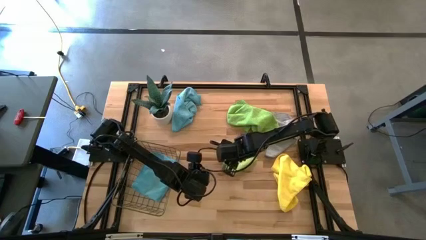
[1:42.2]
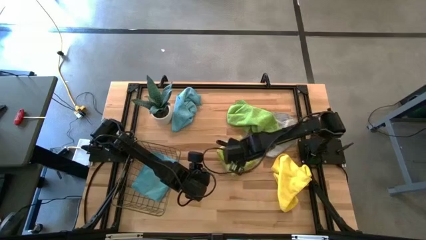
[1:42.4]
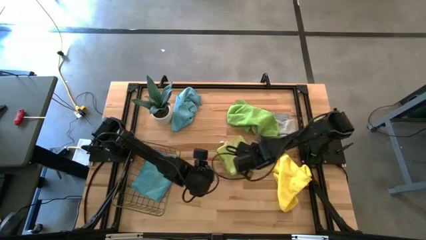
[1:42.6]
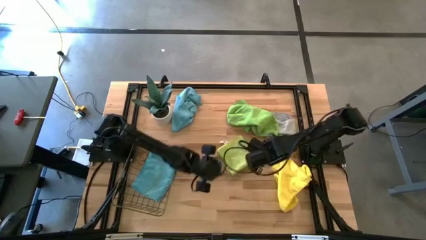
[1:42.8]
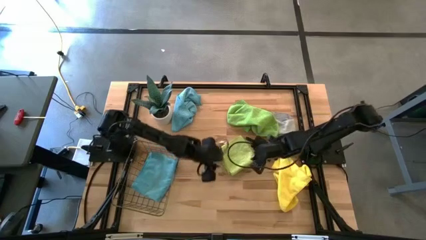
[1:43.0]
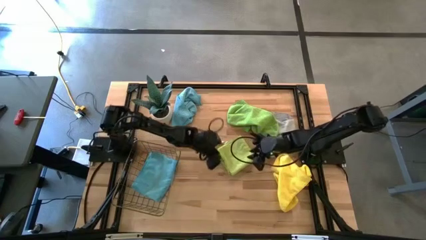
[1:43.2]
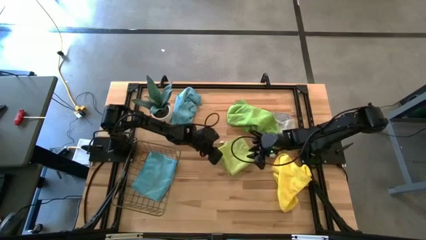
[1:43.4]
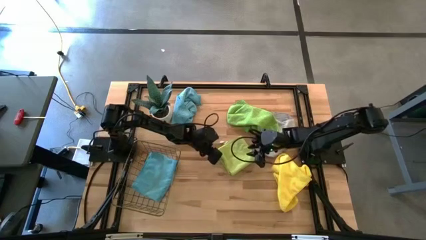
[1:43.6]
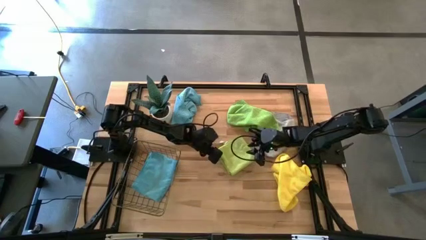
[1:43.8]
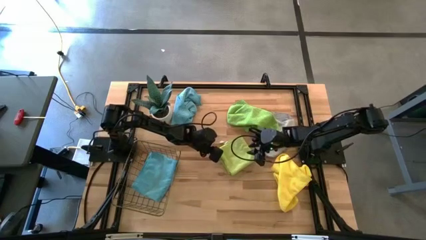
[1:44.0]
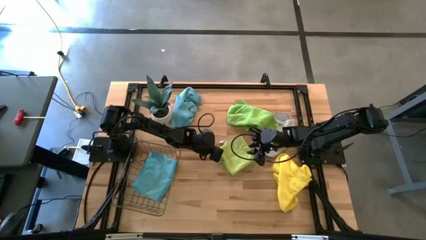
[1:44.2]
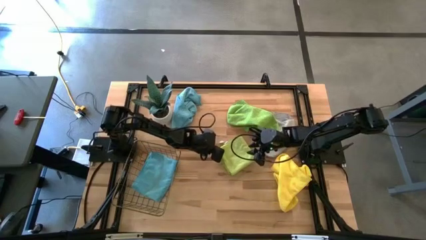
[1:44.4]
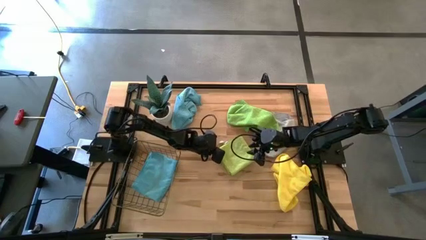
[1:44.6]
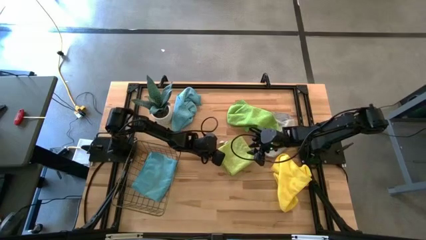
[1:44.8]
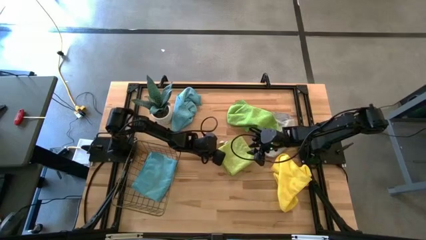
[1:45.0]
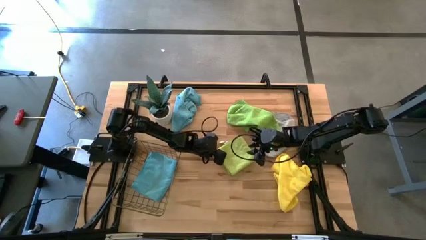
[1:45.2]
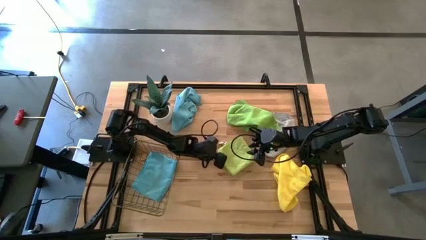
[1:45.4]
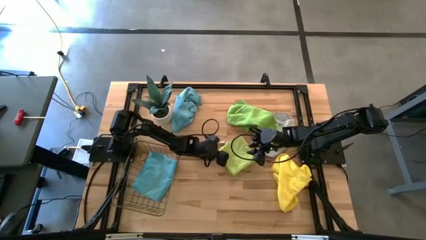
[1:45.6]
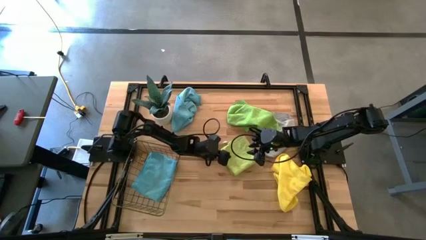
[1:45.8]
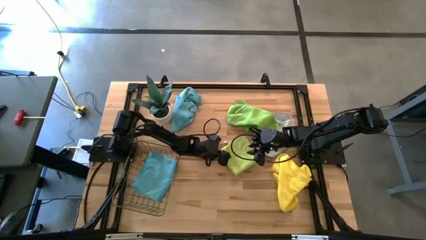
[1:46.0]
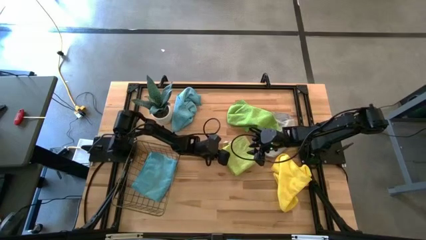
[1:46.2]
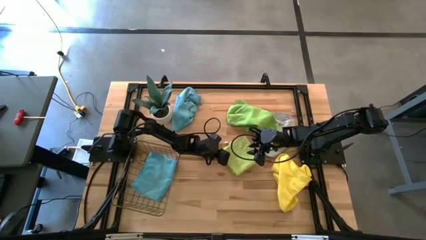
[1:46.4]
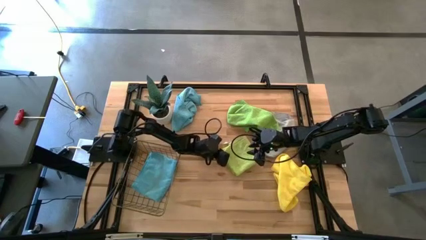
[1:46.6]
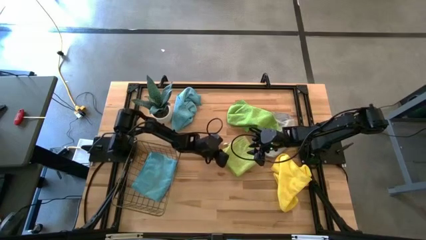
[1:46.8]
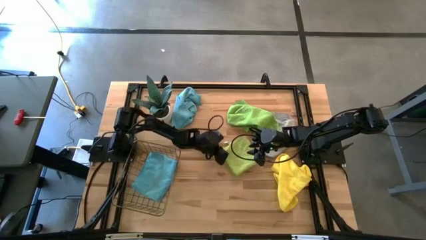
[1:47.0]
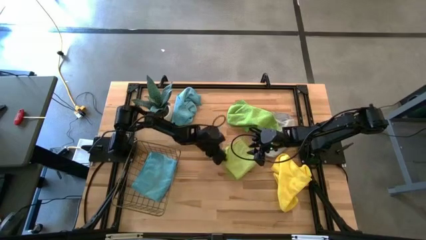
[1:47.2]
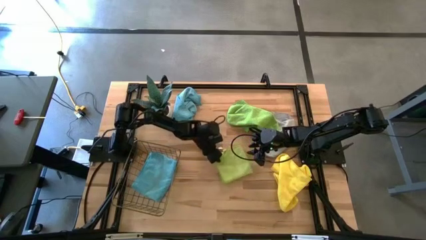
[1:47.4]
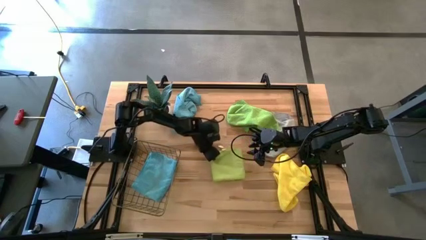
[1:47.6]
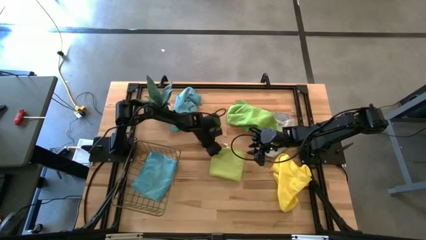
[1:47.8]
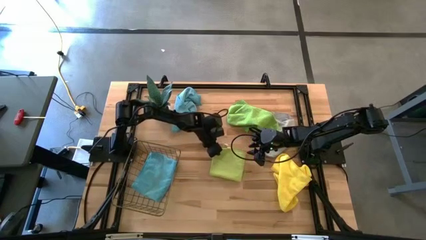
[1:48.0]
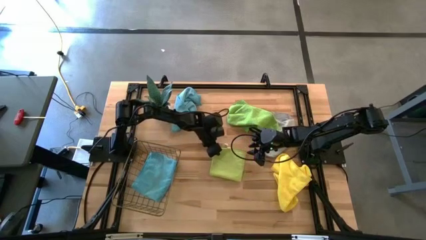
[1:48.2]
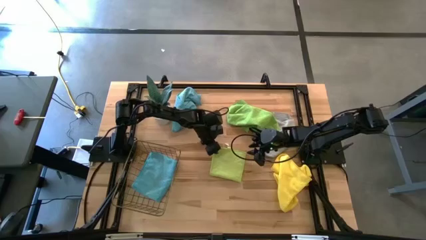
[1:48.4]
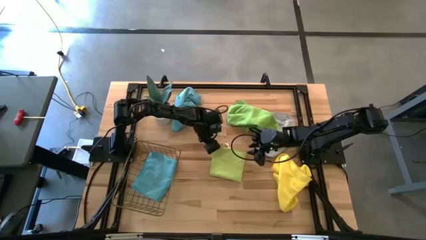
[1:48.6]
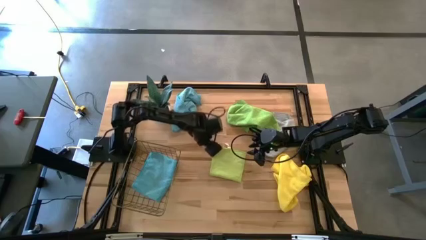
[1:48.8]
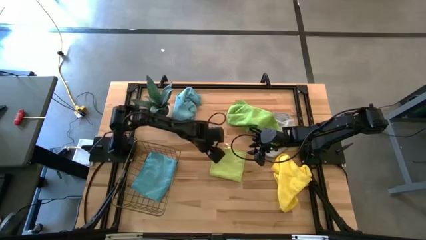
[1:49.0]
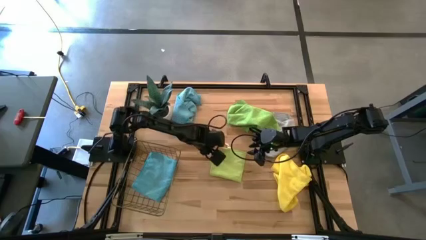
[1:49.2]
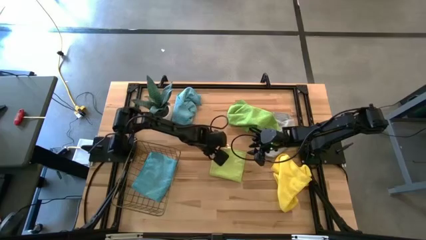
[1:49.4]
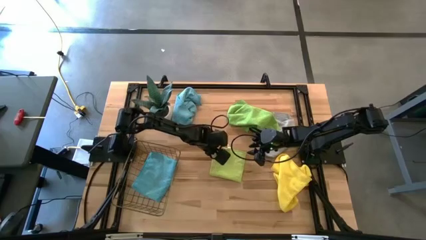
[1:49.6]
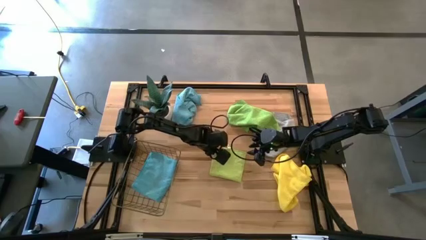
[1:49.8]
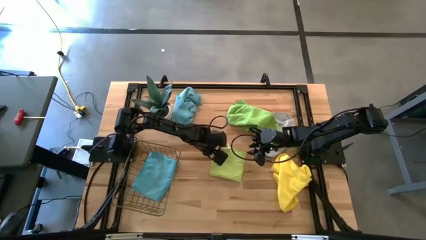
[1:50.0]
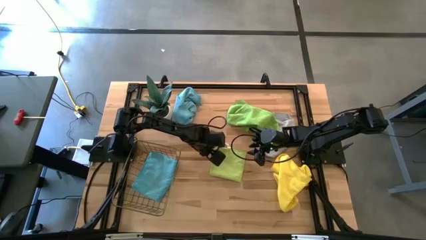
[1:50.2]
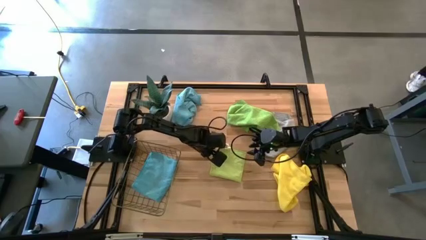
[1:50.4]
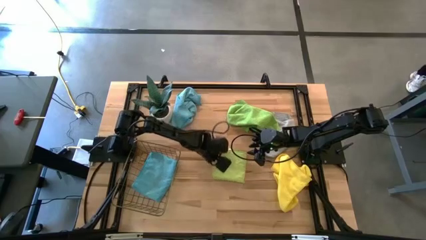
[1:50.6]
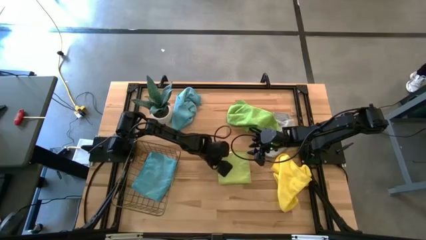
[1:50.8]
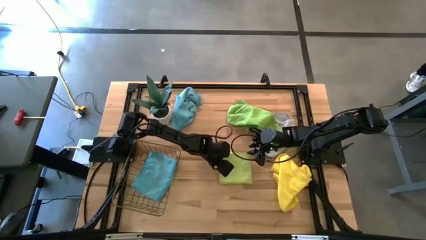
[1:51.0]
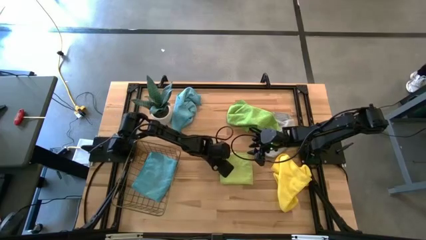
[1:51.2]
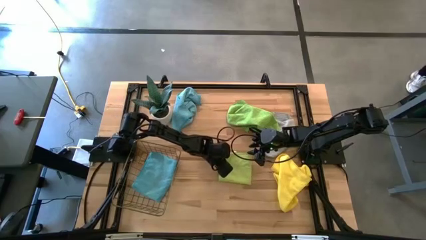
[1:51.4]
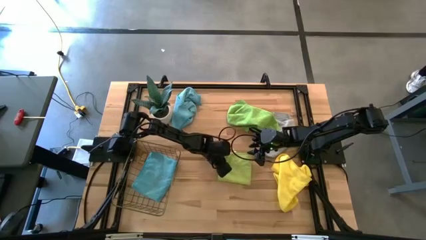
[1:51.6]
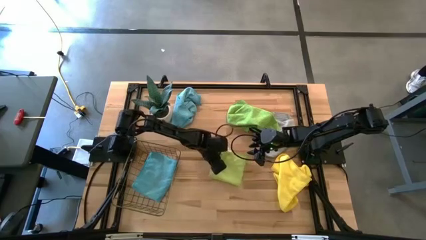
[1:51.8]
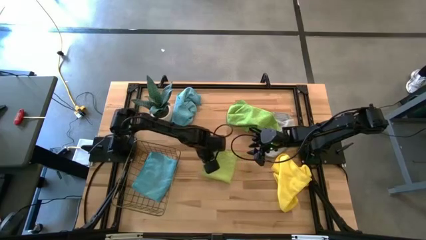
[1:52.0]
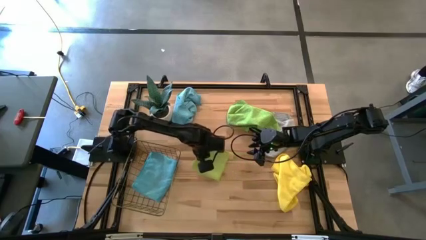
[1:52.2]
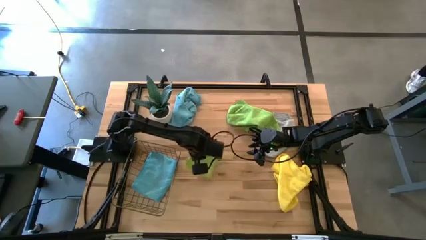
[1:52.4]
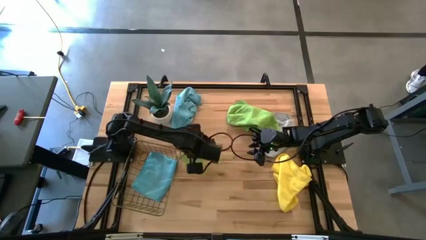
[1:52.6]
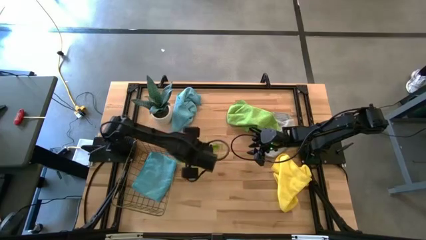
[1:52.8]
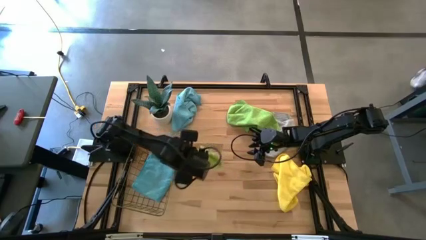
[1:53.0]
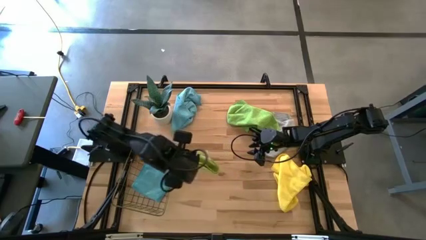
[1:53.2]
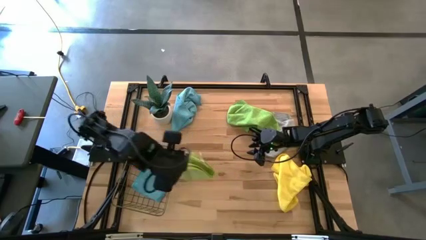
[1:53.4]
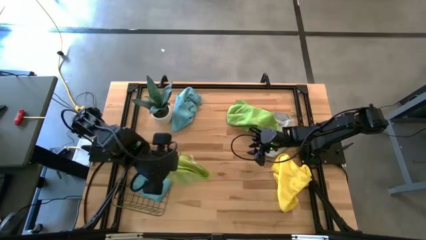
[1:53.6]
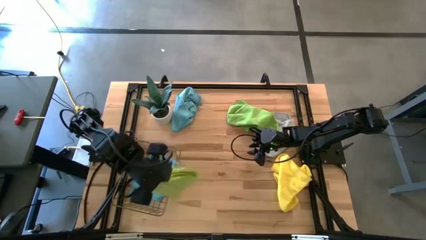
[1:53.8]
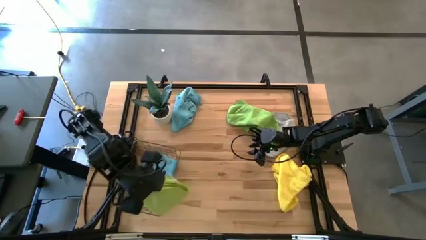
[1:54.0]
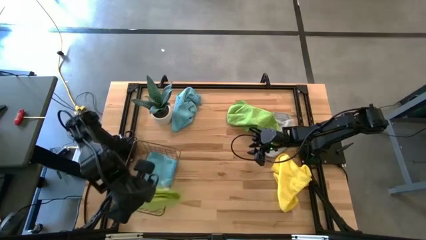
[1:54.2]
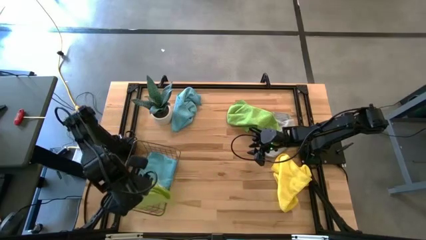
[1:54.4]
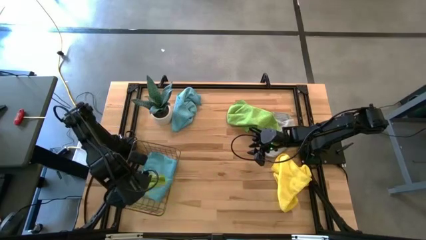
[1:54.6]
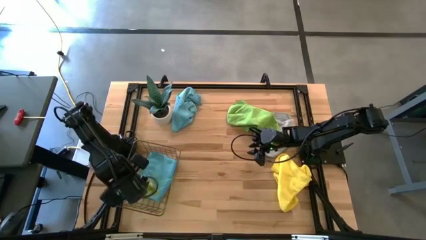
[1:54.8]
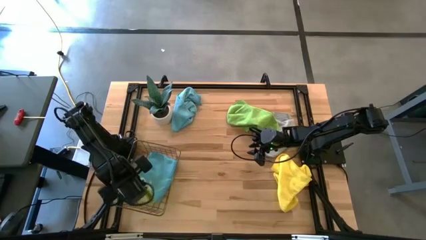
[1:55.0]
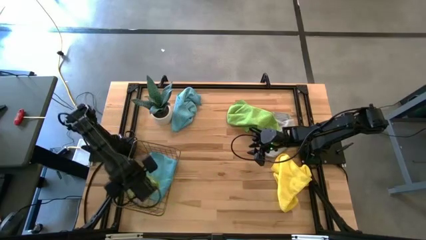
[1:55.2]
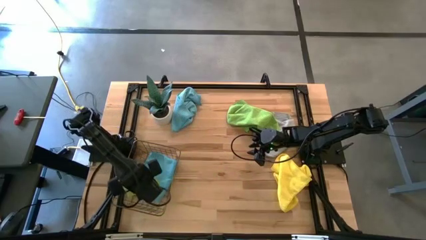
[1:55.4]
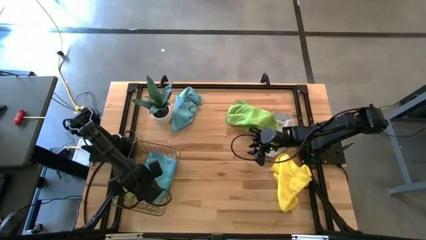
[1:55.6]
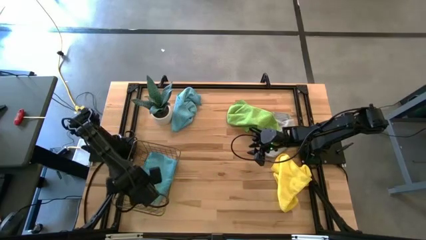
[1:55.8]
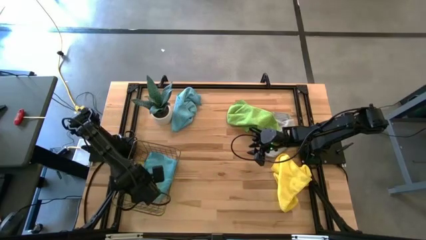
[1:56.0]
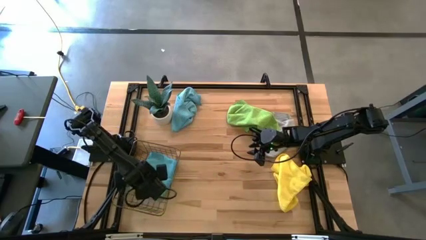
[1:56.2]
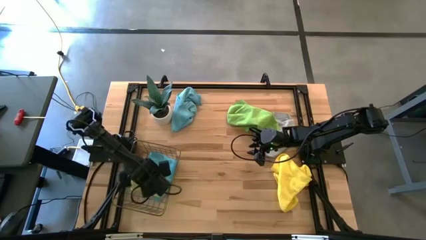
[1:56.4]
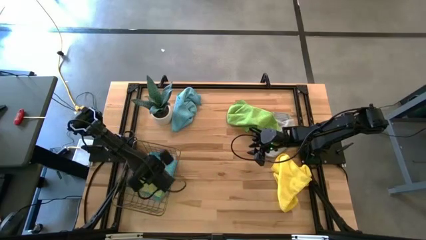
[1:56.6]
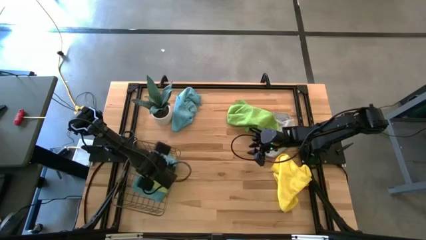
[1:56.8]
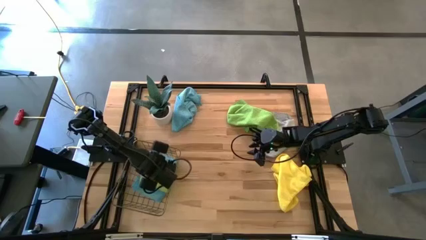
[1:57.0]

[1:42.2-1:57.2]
Task: Fold microfiber towels
Put the light green microfiber towel into the wire basket
